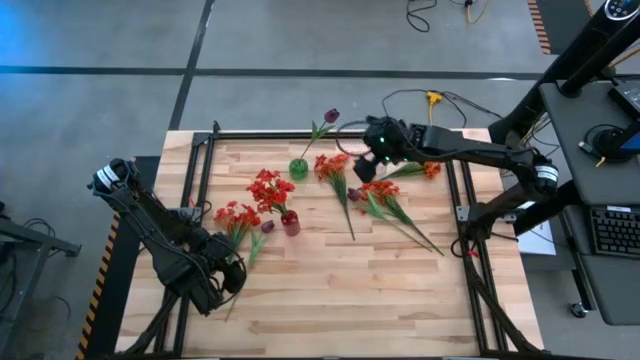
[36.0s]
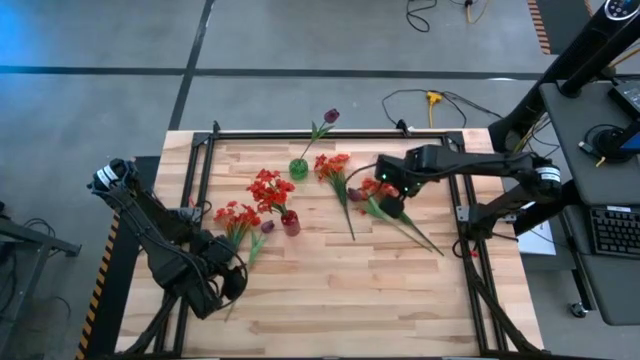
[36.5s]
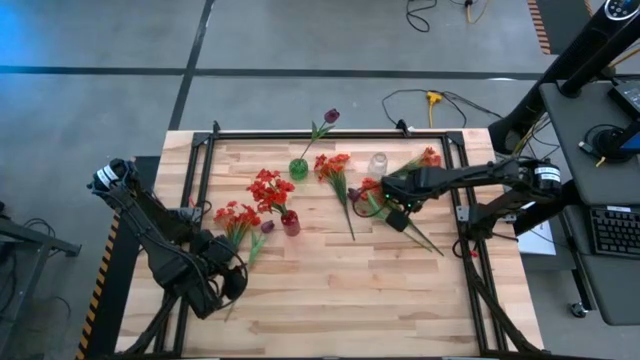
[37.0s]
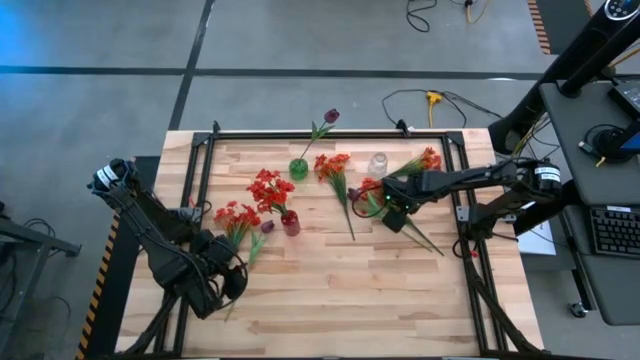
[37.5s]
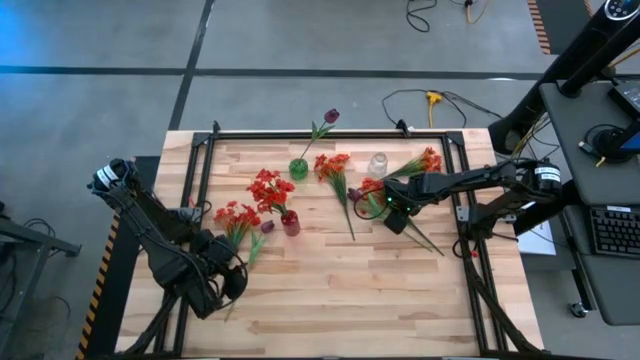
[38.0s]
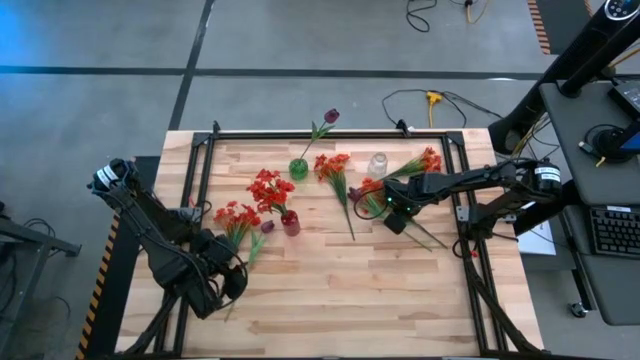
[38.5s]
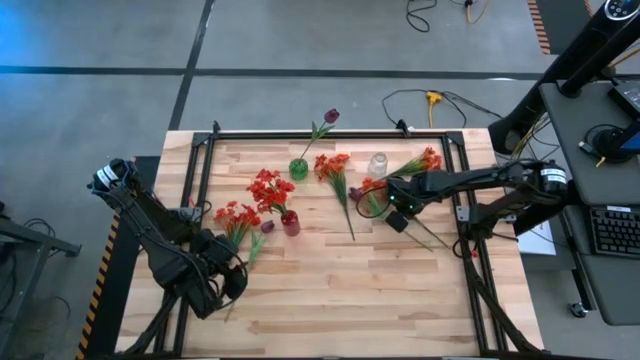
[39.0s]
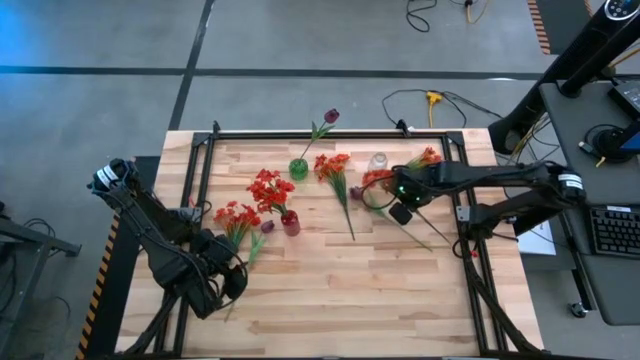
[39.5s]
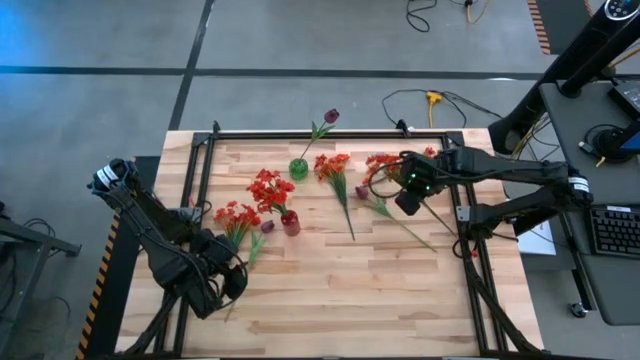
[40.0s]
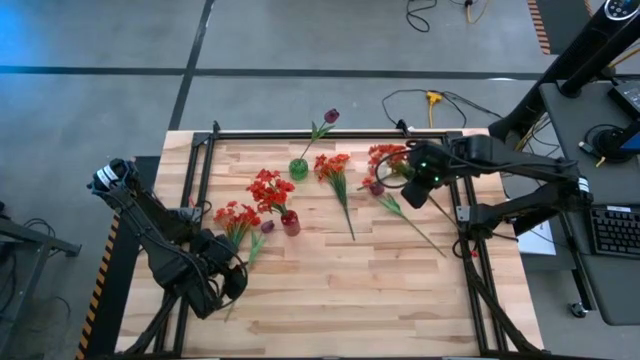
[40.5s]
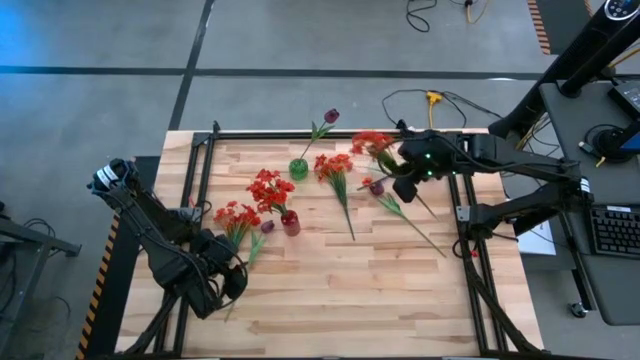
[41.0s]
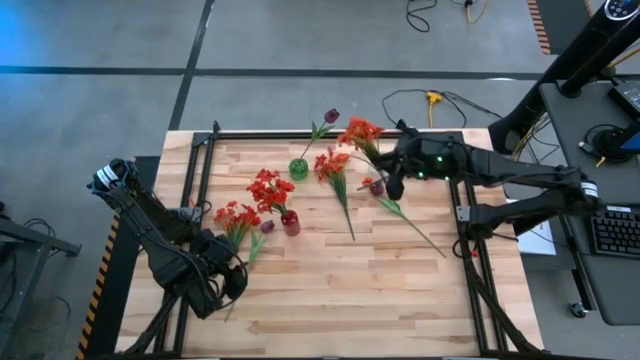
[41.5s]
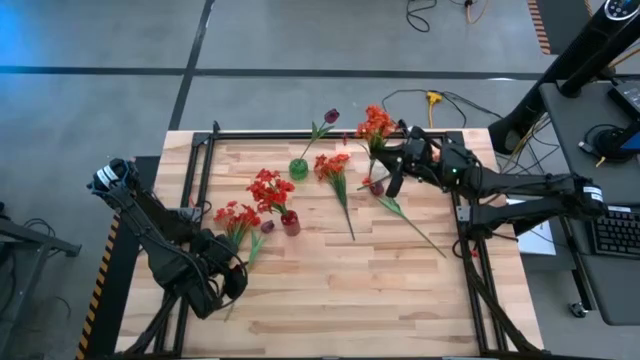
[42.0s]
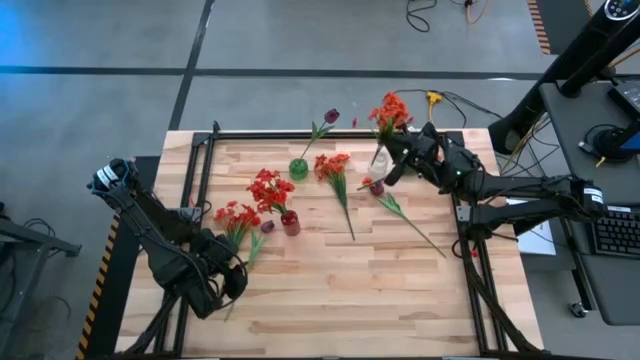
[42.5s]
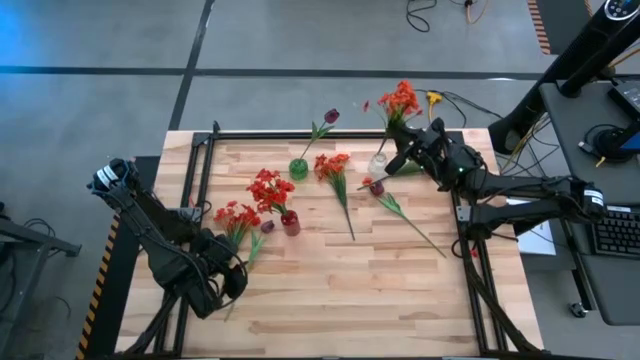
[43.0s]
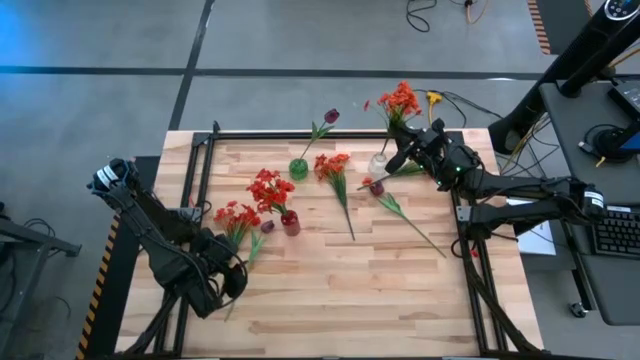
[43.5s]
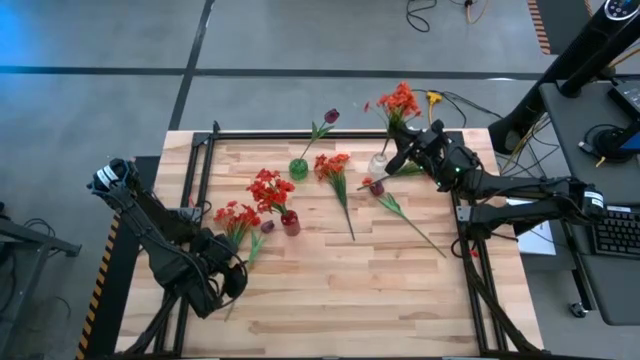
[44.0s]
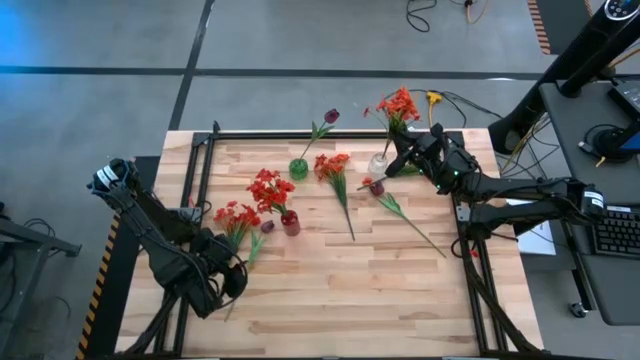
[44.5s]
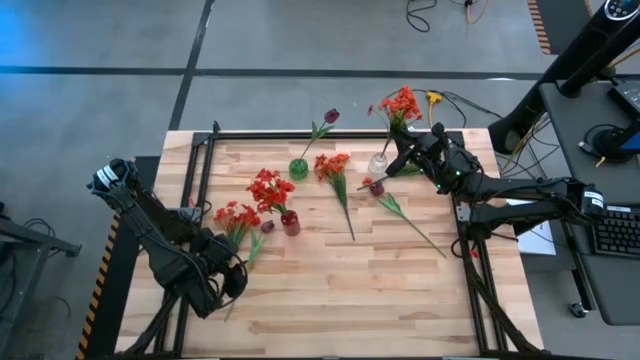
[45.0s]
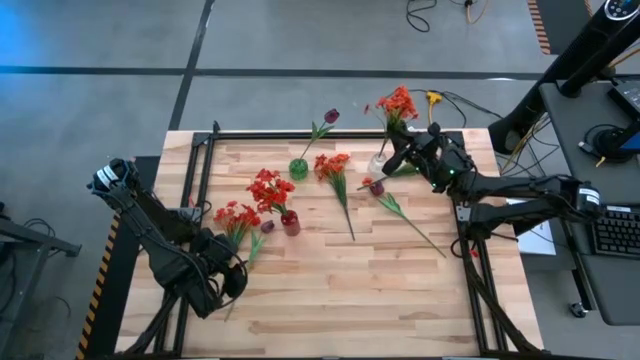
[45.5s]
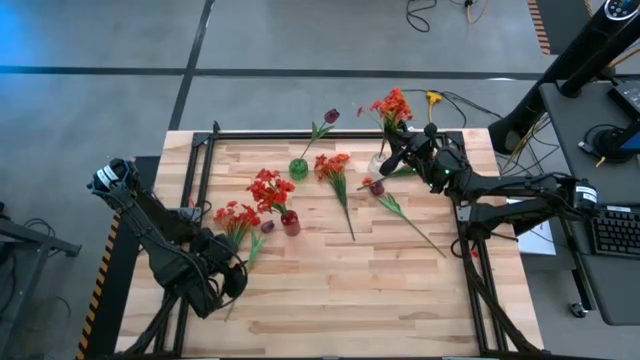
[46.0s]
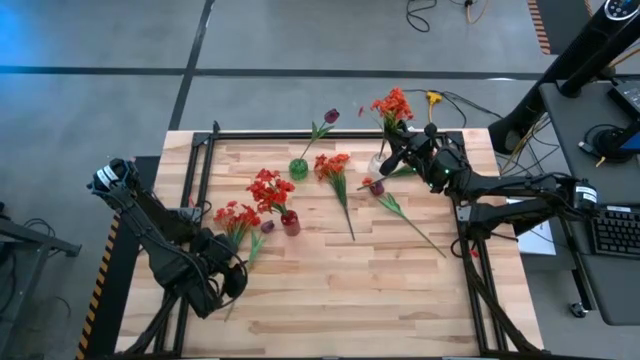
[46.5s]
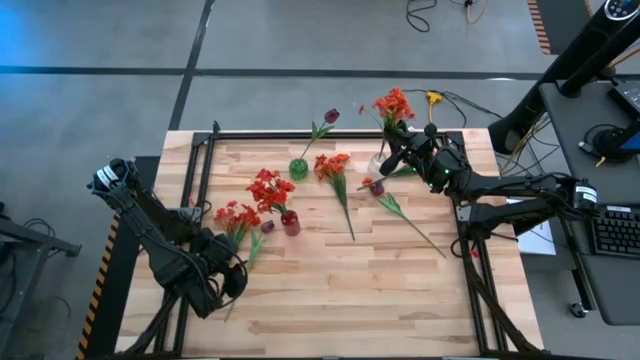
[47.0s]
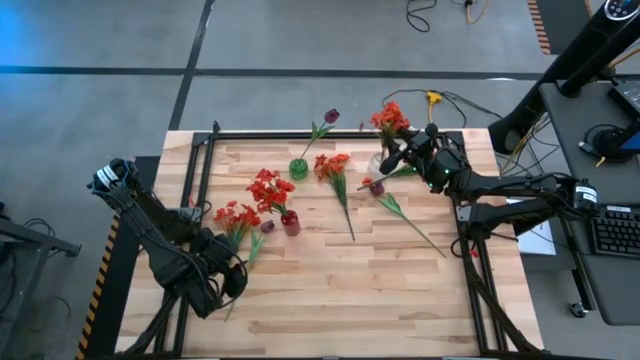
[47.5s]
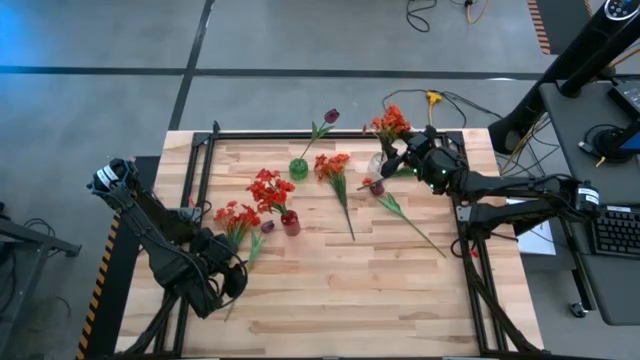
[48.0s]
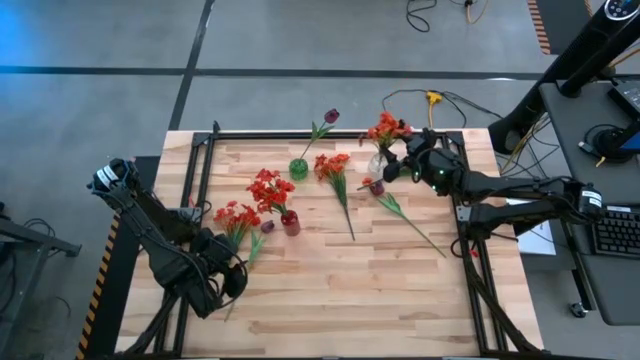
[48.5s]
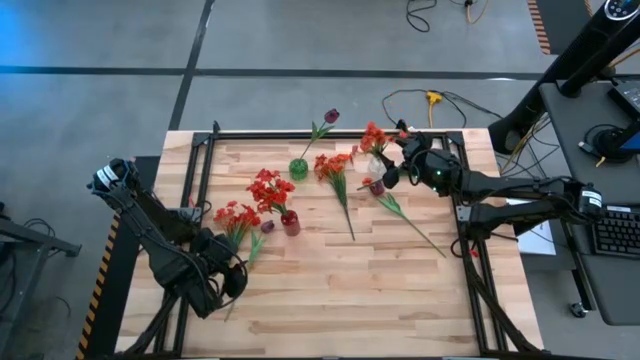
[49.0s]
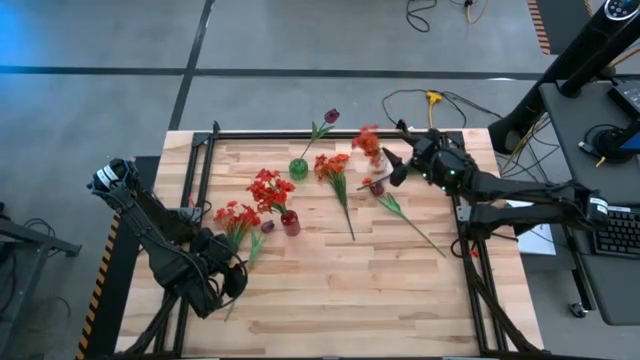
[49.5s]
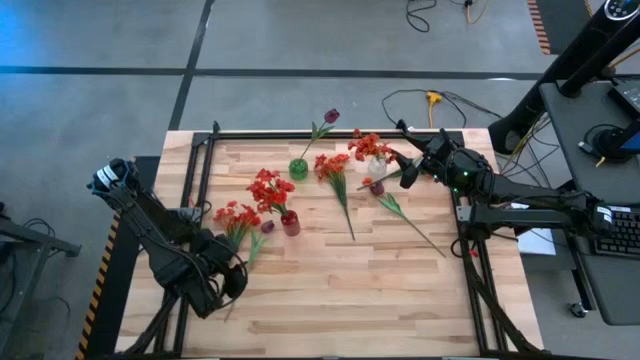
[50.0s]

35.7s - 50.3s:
Task: Sort flowers into vase by color
Put the bottom orange flowers into the transparent vase

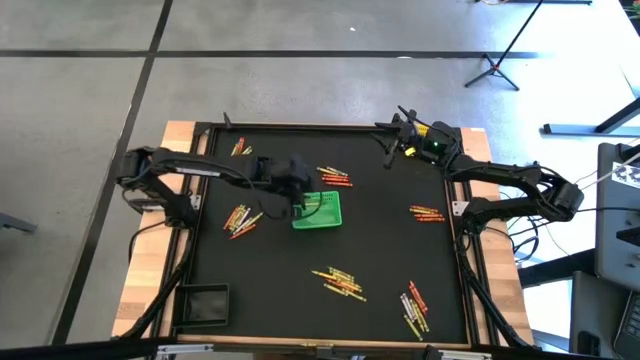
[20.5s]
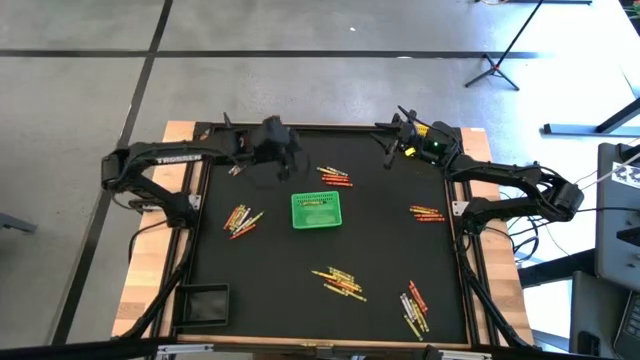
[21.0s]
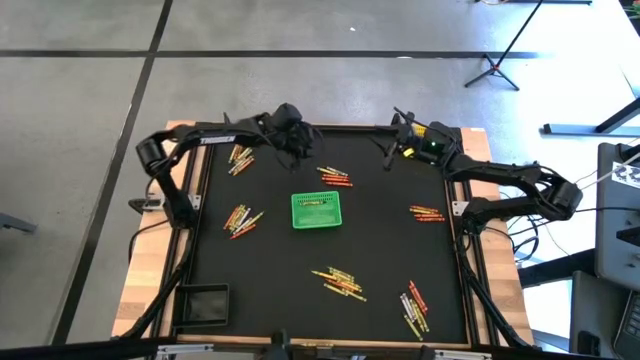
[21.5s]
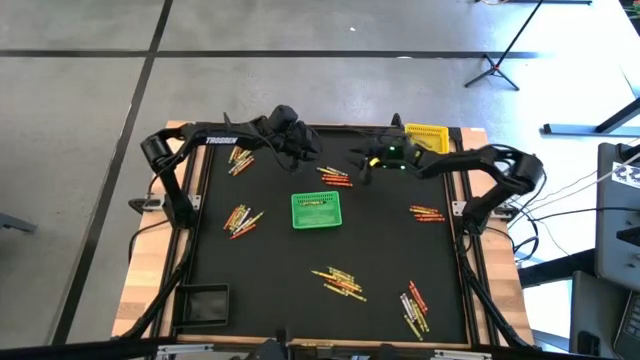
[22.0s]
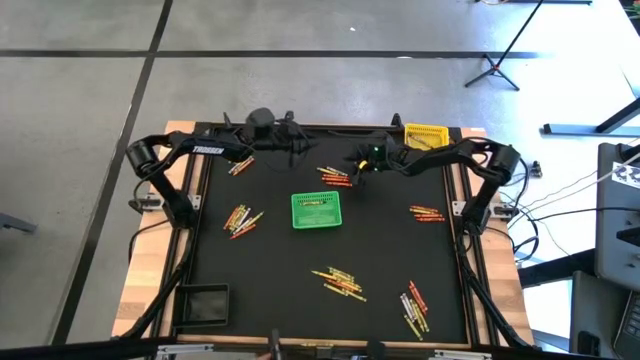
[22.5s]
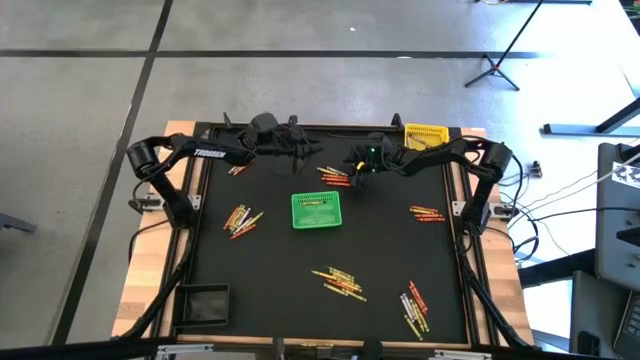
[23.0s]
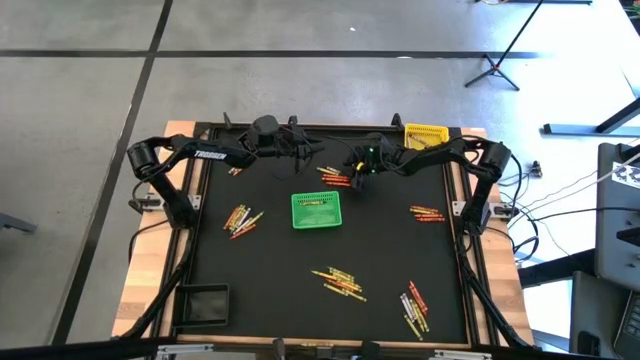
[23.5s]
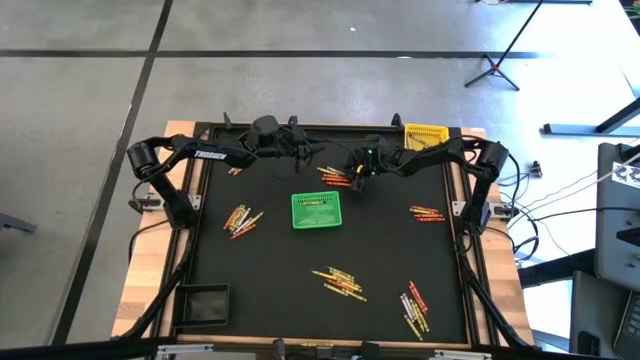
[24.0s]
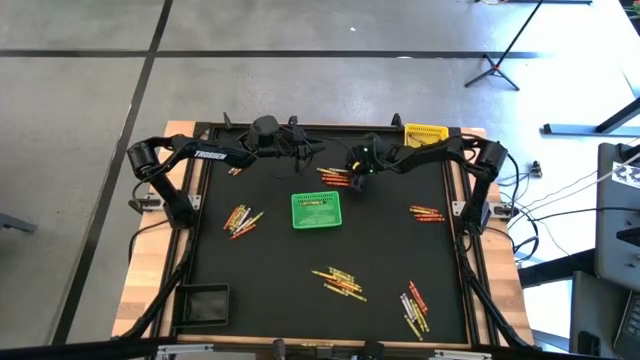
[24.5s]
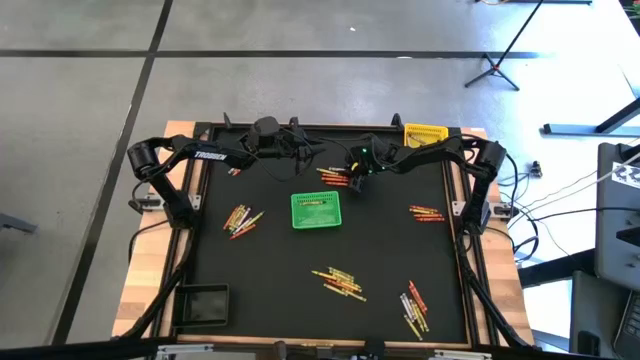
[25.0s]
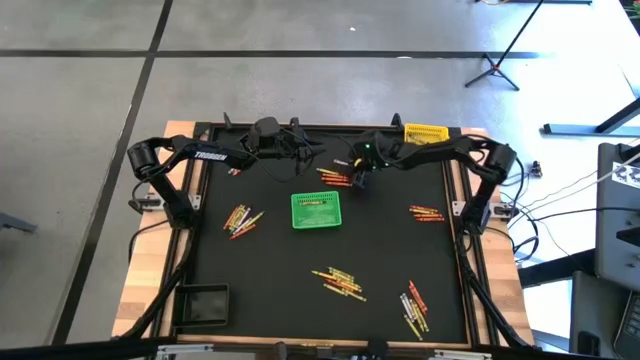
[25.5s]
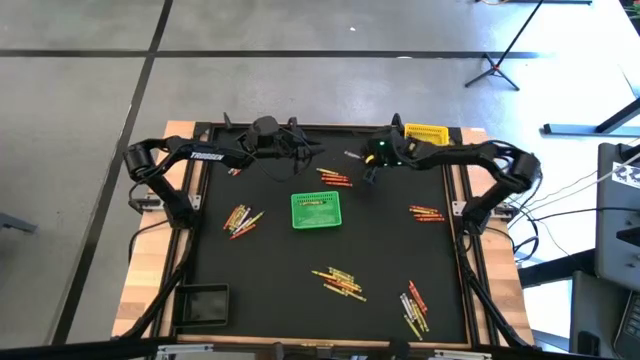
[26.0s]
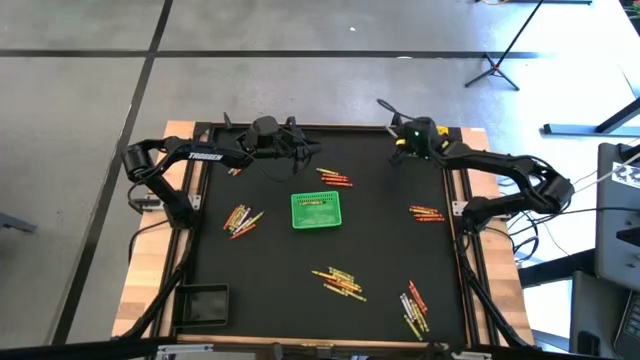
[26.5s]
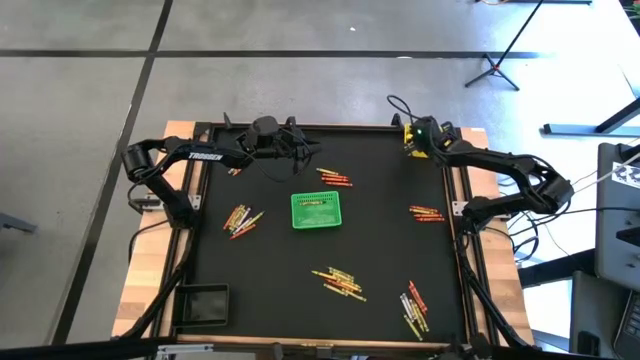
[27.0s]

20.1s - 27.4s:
Task: Sort crayons
Put the black crayon into the yellow bin
